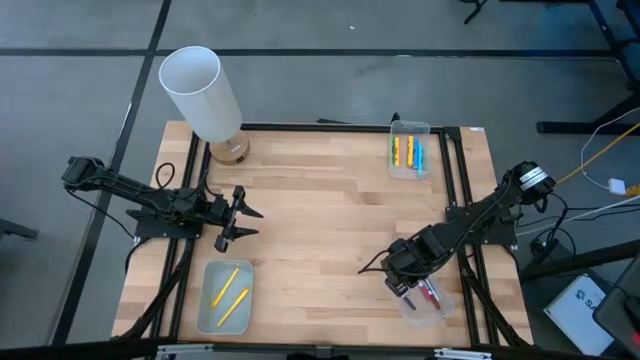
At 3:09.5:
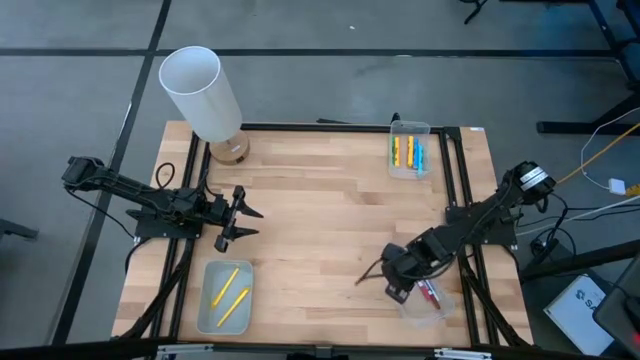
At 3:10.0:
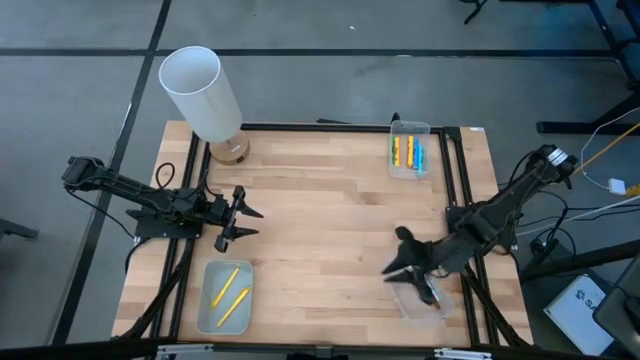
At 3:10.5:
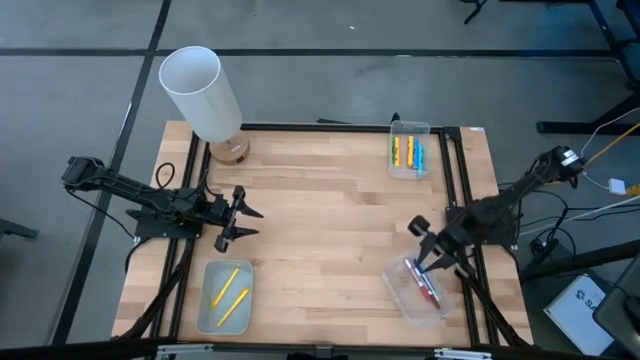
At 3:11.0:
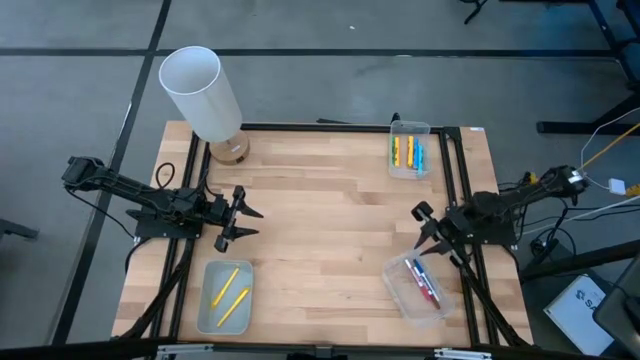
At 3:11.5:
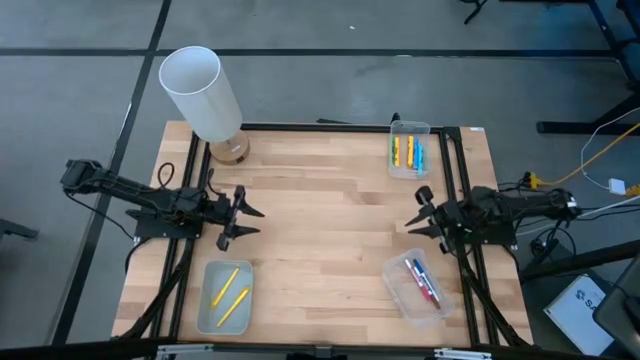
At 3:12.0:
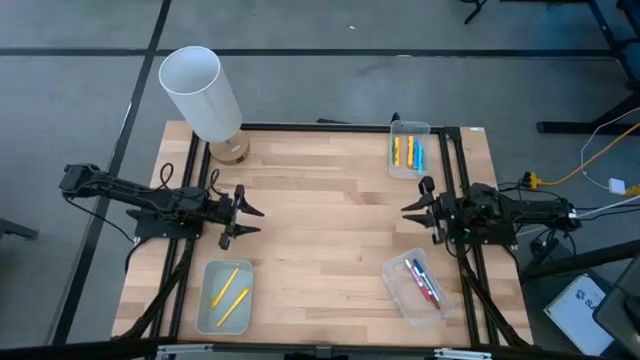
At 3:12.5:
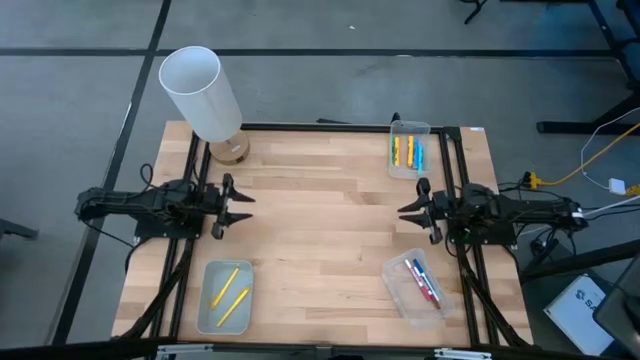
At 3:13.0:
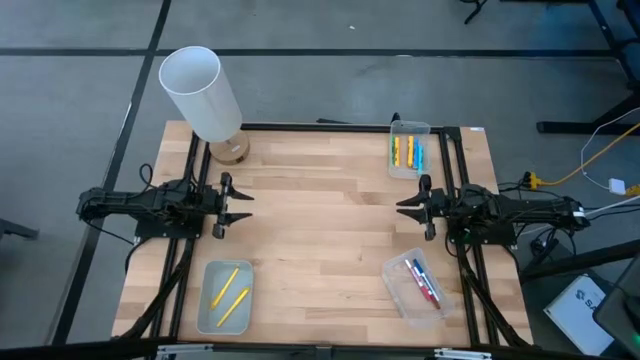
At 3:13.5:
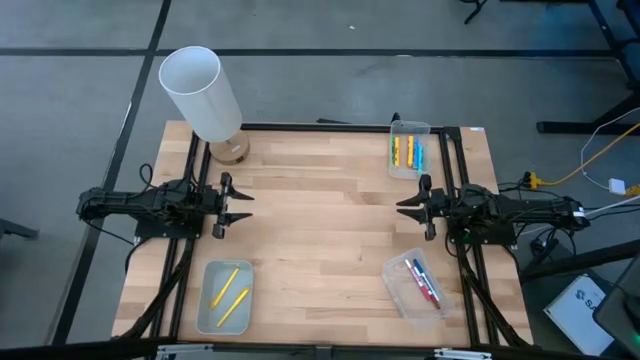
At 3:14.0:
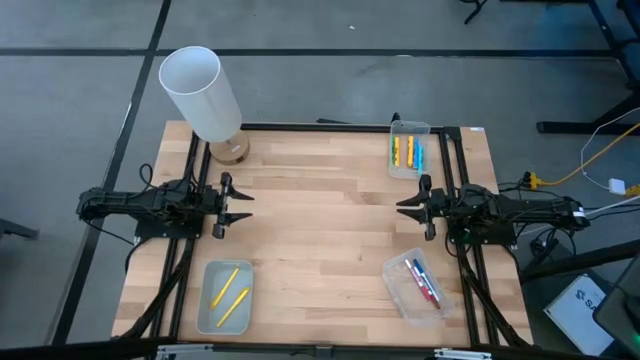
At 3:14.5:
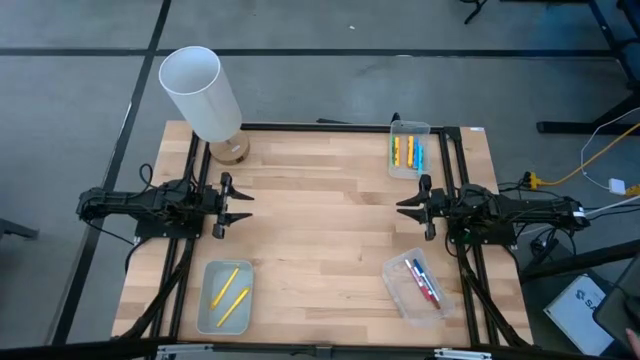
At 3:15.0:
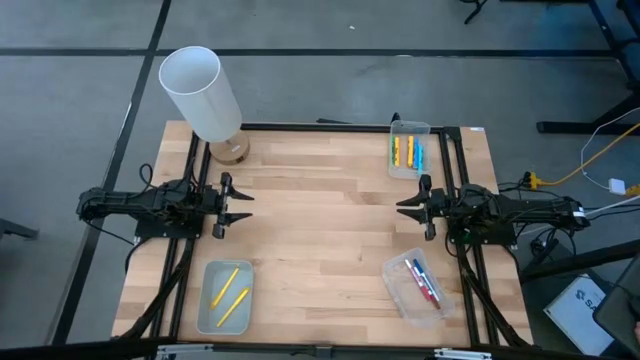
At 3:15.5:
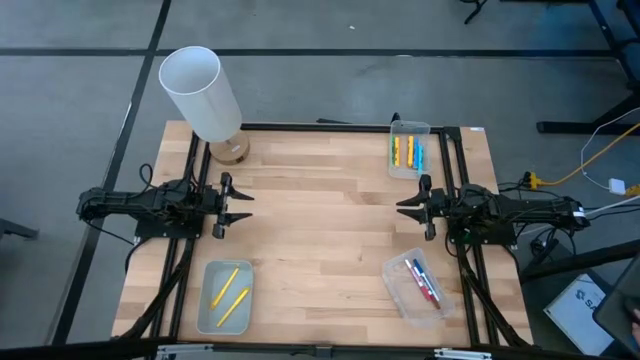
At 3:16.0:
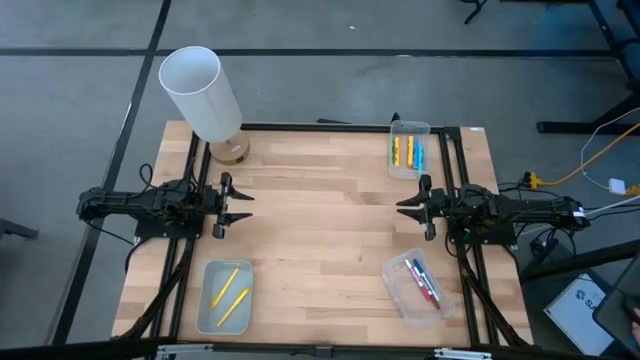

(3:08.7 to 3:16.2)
Task: Pick & Place Markers
Return to Home Position

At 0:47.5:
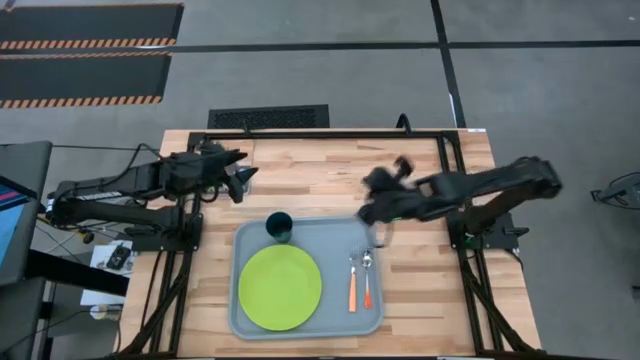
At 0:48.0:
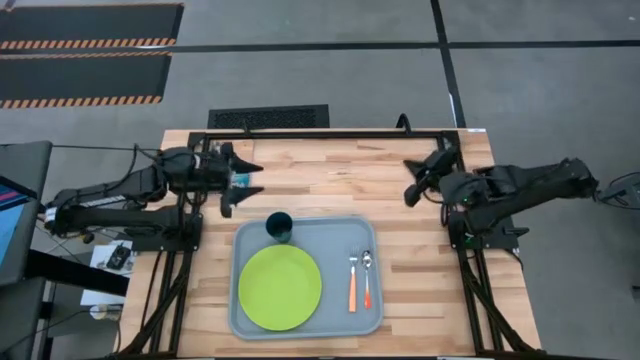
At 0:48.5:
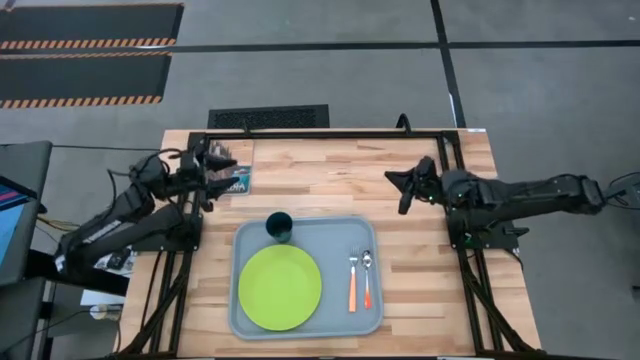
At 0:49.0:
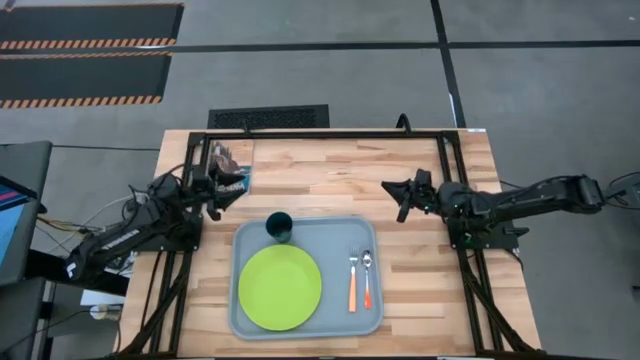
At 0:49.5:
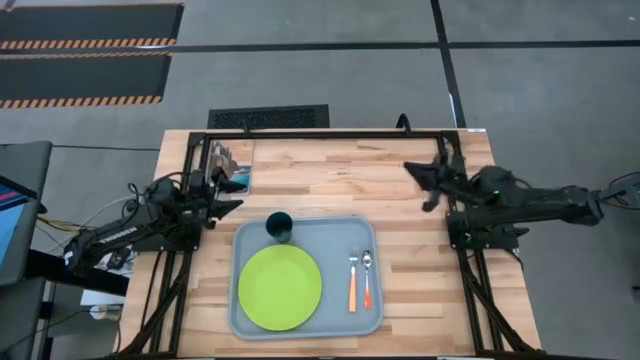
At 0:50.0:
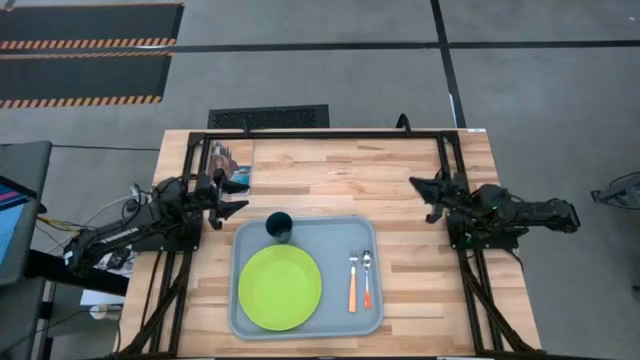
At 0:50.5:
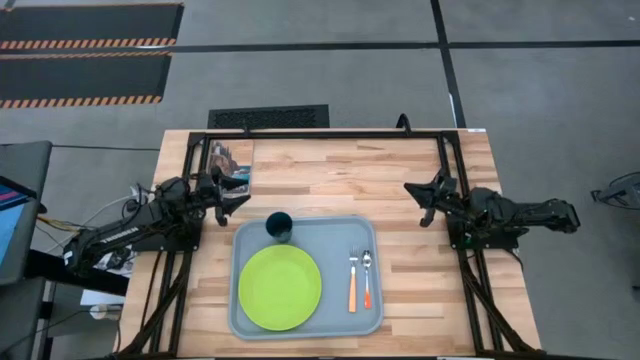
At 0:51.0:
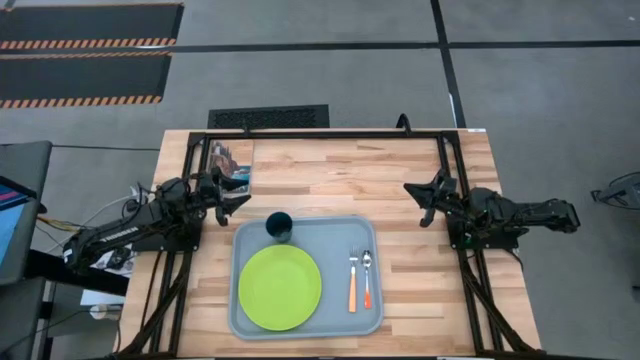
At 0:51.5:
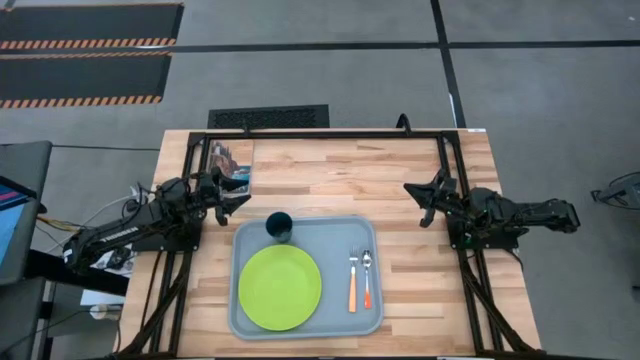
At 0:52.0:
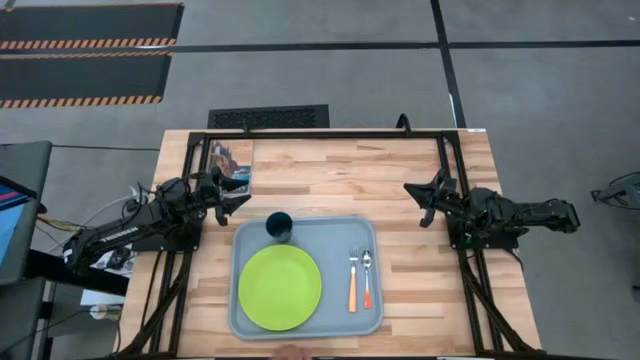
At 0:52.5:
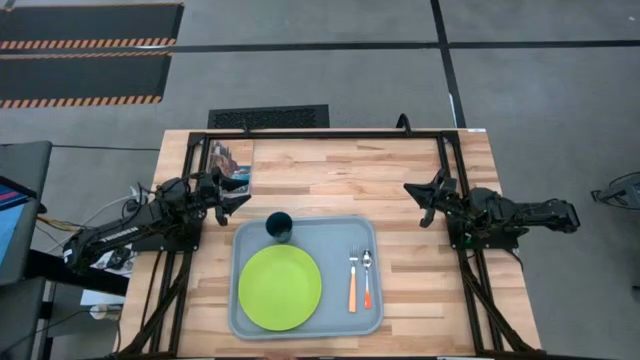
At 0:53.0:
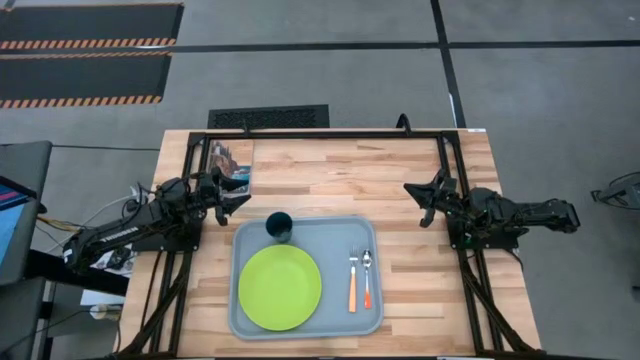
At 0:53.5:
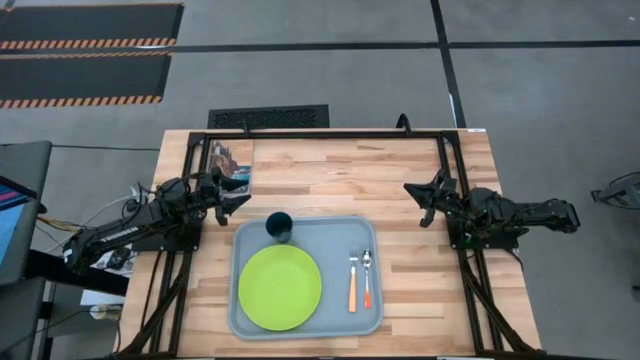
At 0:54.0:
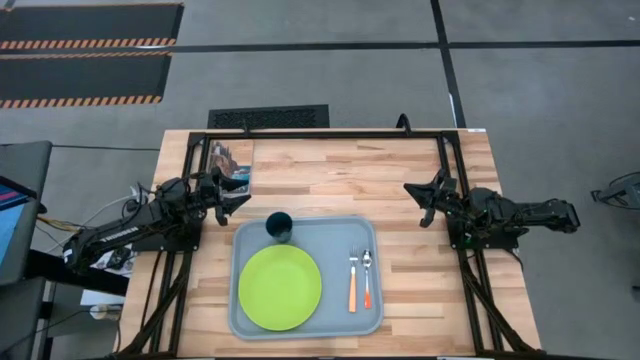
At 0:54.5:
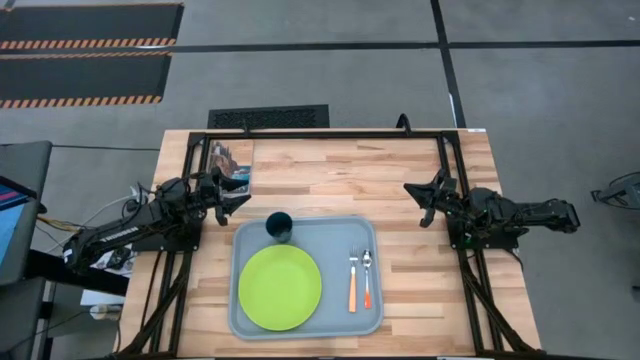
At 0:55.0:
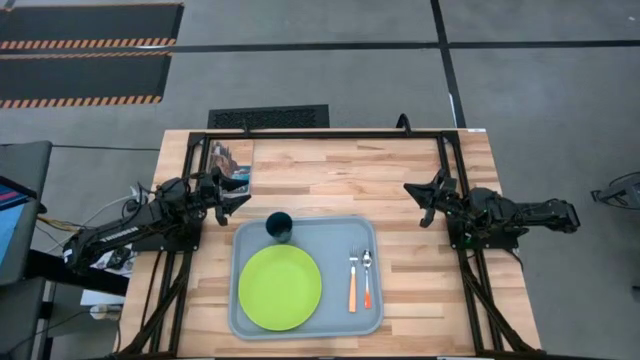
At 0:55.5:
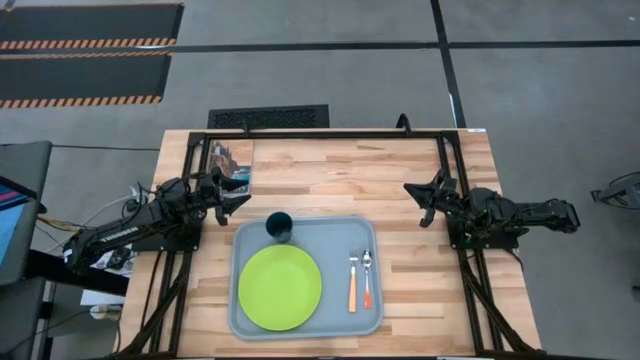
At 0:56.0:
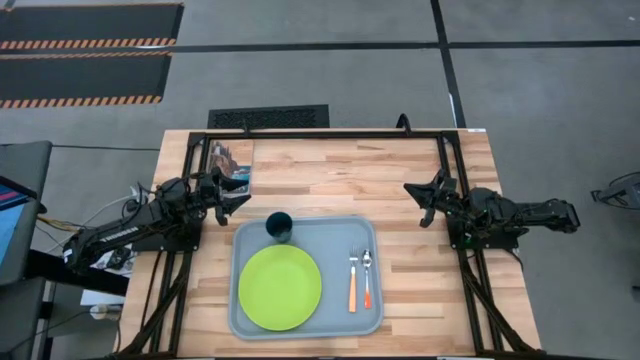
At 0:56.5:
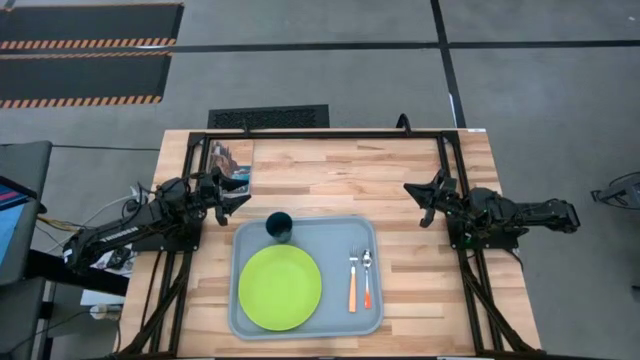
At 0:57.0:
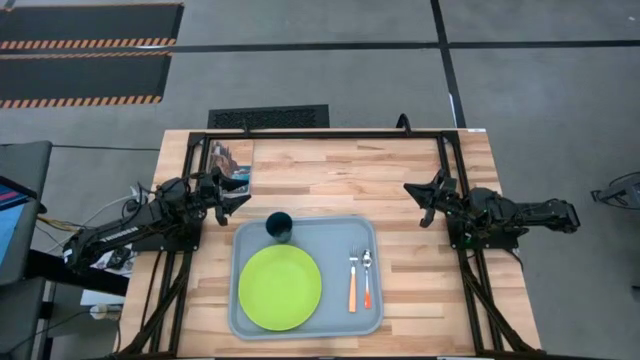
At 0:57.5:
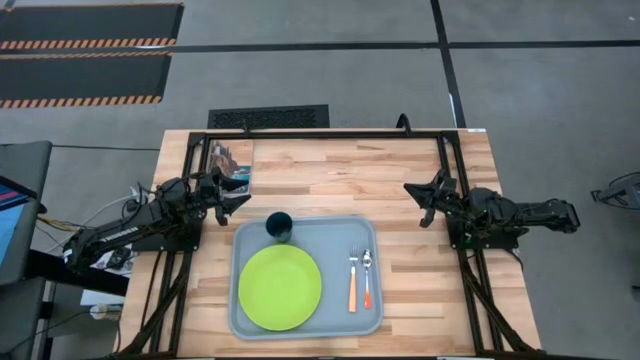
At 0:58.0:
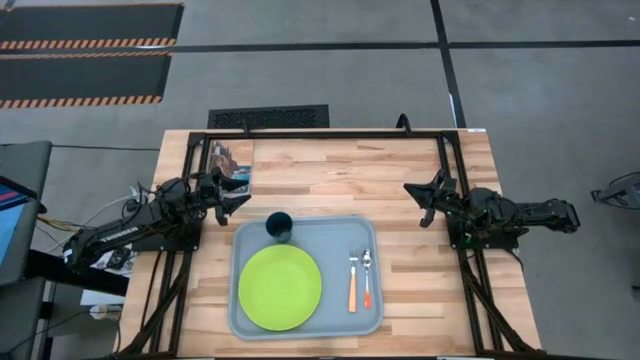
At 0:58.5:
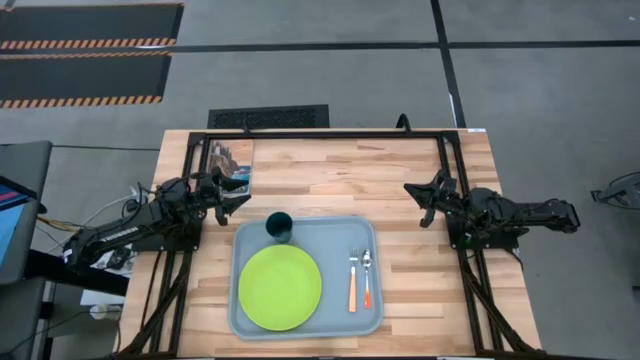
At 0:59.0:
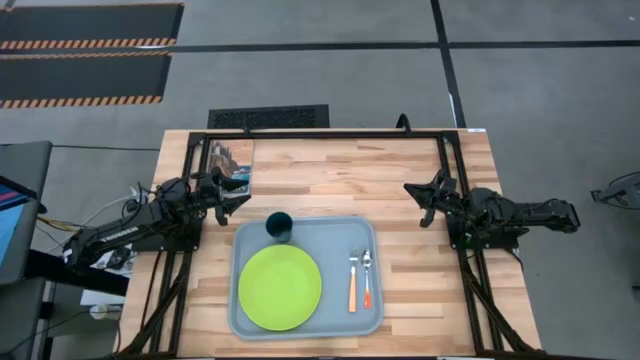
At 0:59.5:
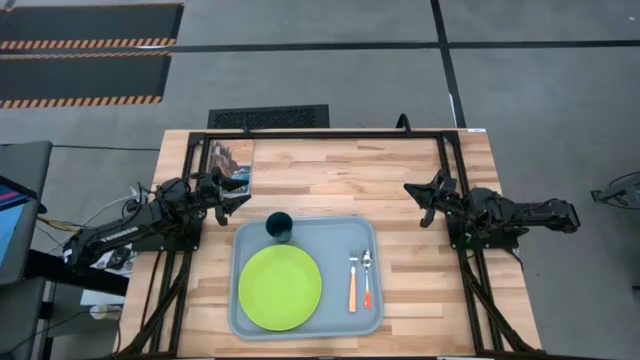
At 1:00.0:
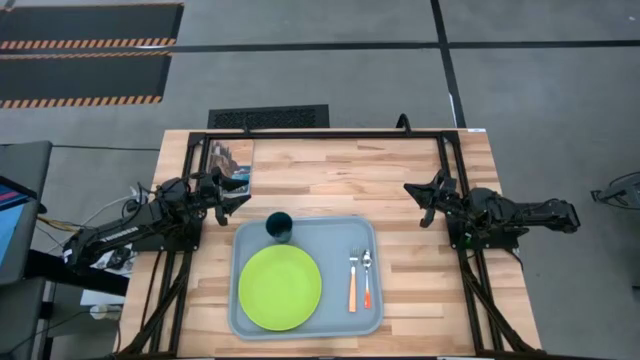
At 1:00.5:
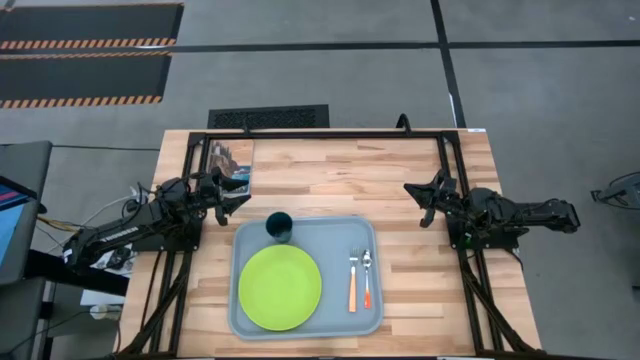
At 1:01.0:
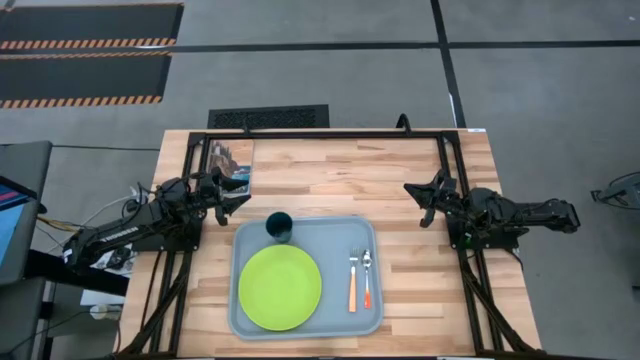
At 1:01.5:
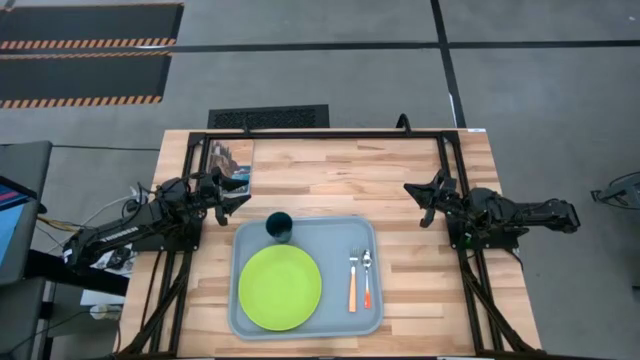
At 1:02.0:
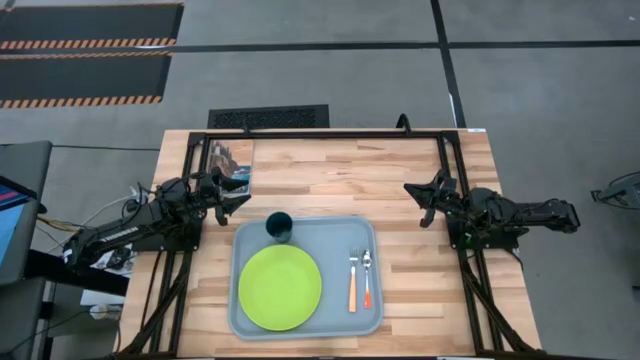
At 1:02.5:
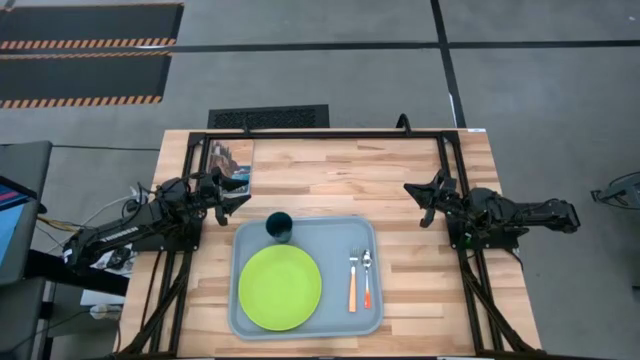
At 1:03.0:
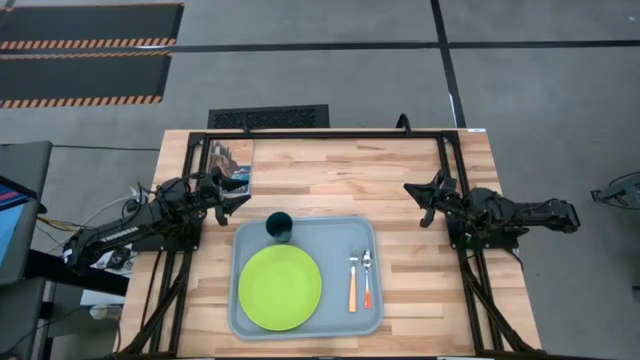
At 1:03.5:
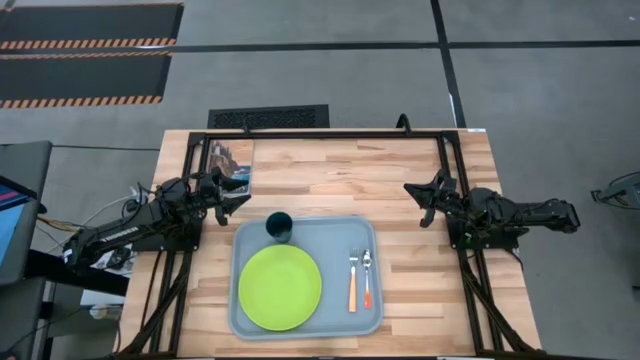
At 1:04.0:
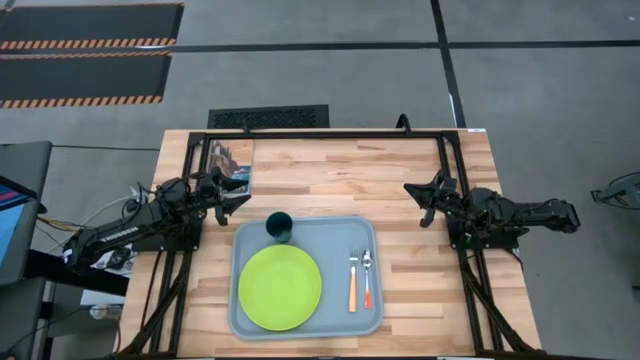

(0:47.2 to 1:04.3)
Task: Pick and place plate/cup/fork/spoon on tray
Return to Home Position
